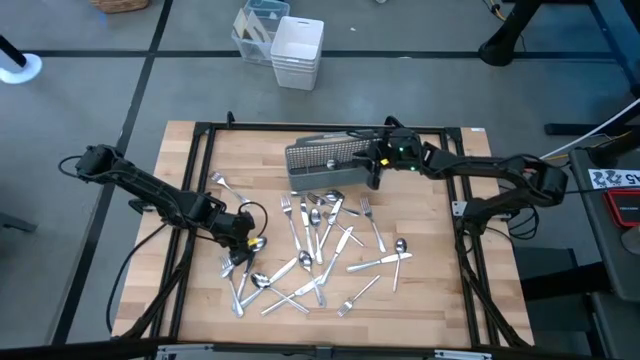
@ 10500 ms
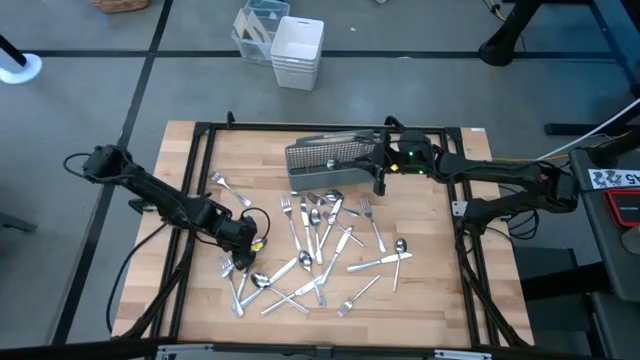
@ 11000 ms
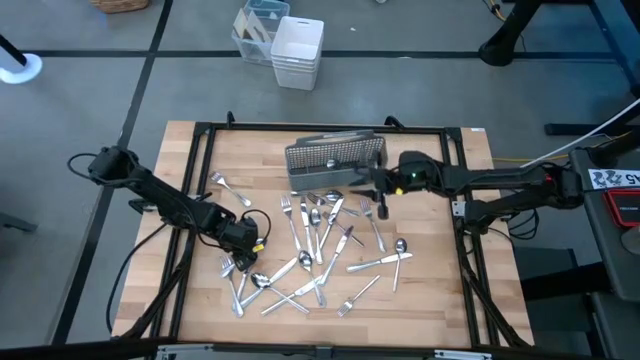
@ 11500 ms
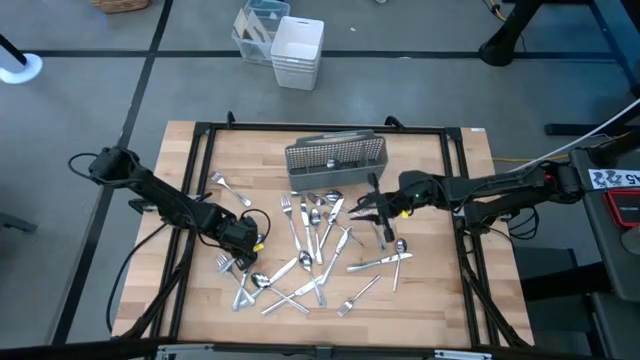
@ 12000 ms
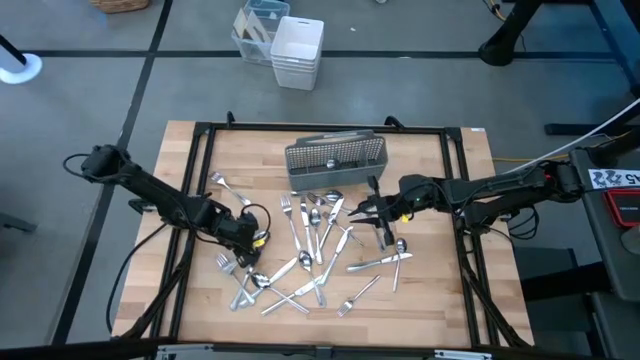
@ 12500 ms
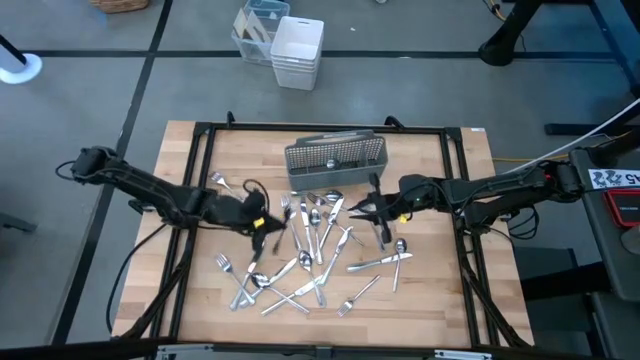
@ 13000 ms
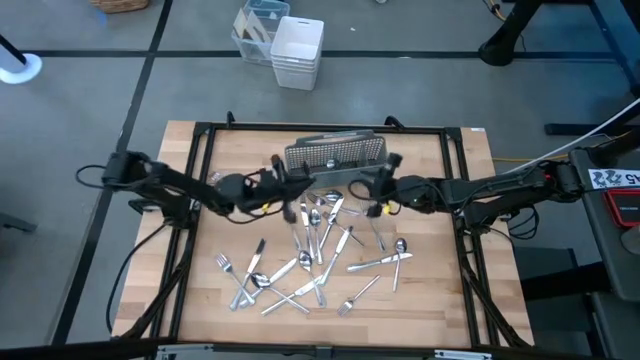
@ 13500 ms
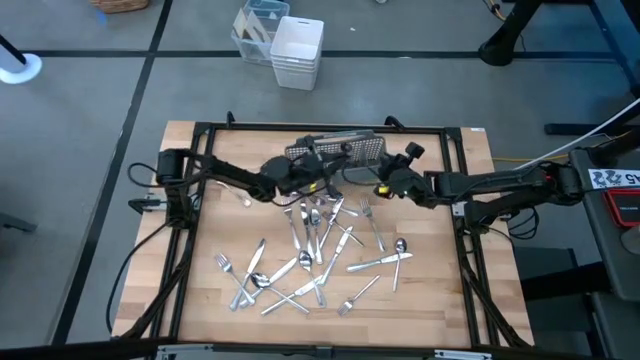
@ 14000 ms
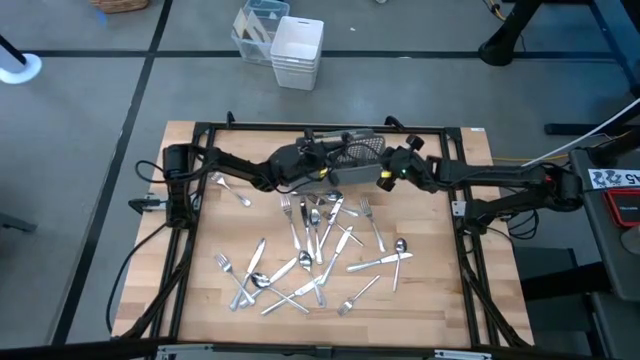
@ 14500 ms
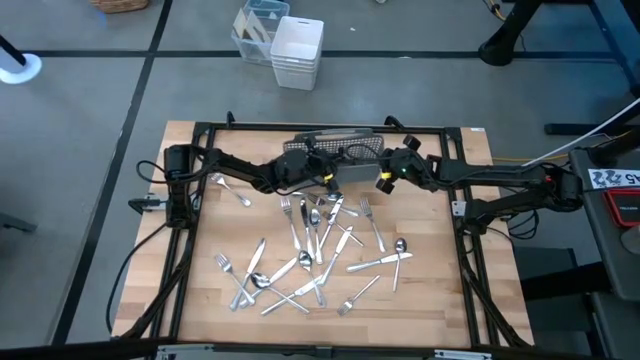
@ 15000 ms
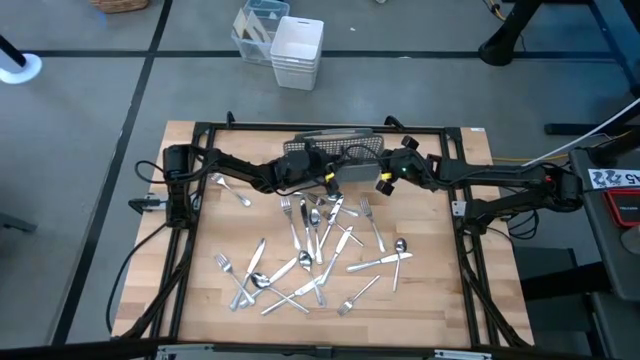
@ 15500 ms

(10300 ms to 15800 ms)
Task: Sort silverware
Put the spoon into the silverware rack

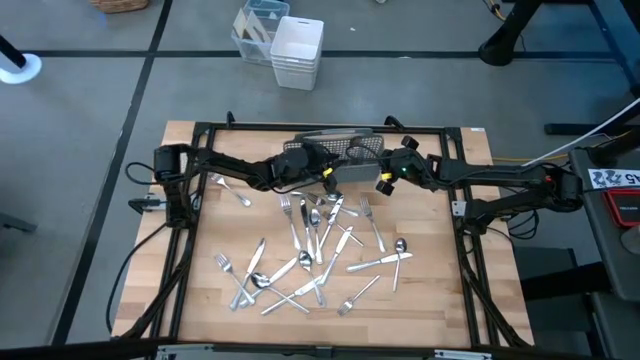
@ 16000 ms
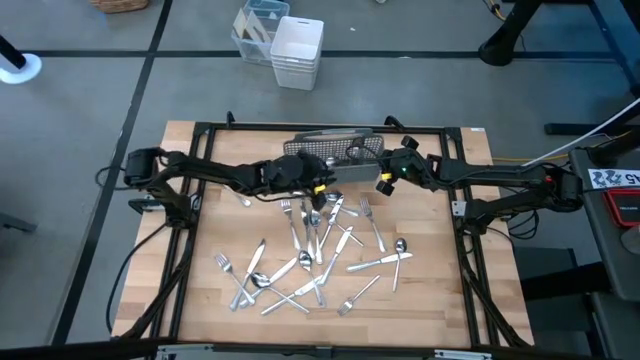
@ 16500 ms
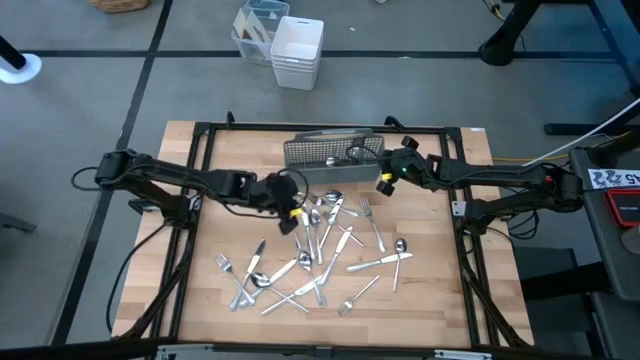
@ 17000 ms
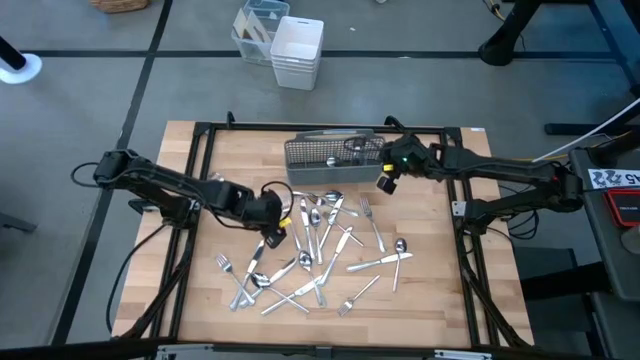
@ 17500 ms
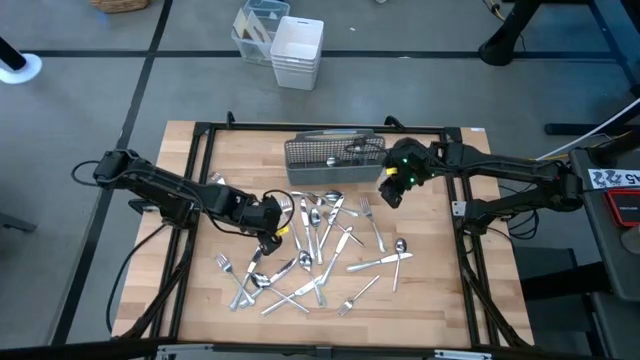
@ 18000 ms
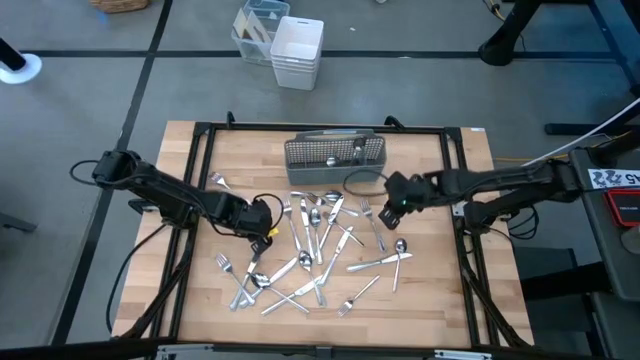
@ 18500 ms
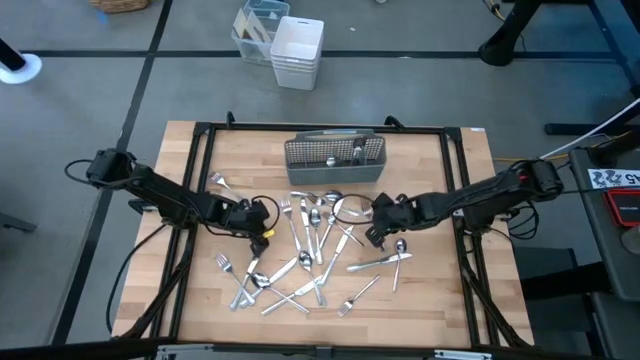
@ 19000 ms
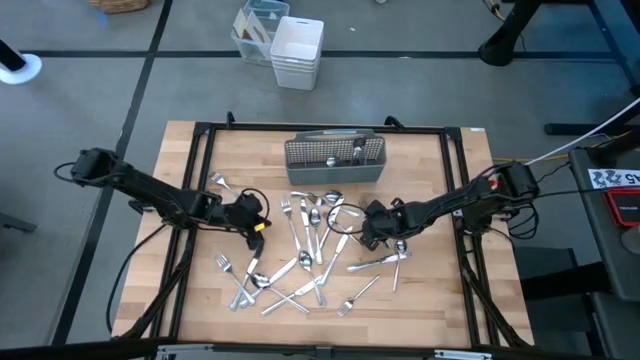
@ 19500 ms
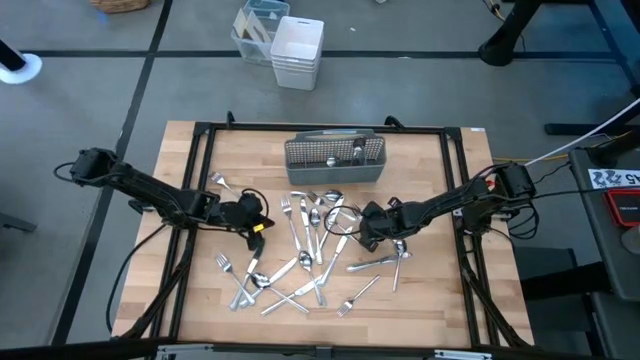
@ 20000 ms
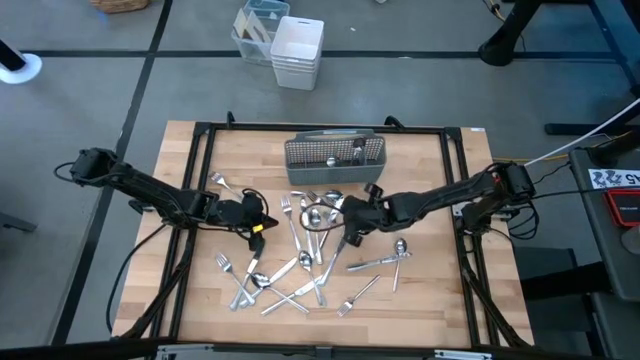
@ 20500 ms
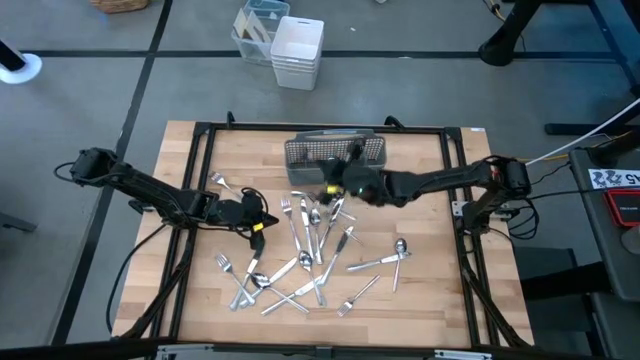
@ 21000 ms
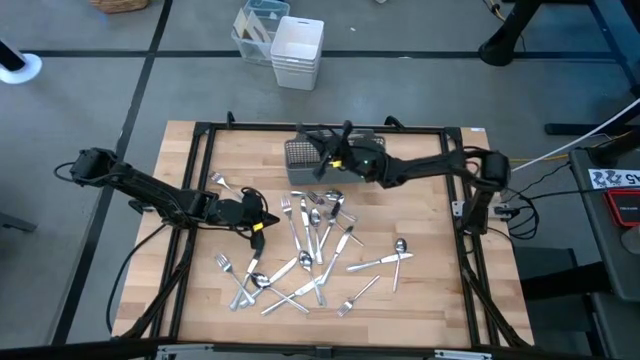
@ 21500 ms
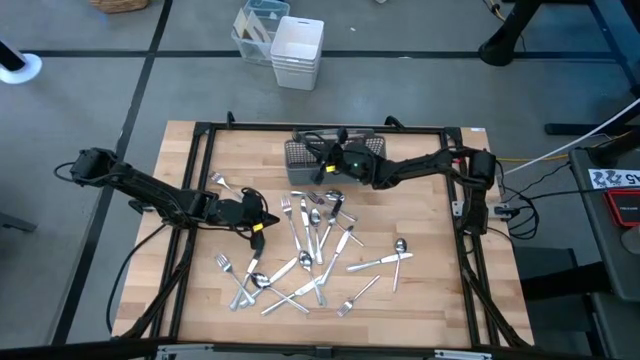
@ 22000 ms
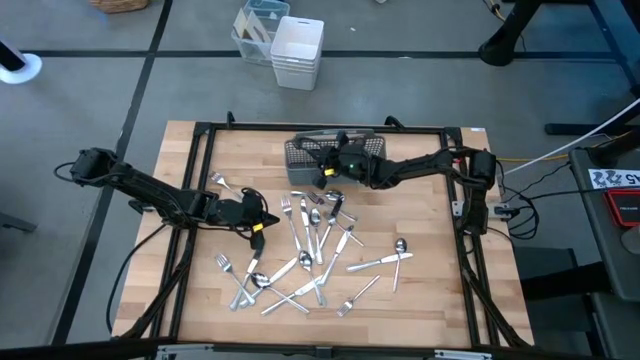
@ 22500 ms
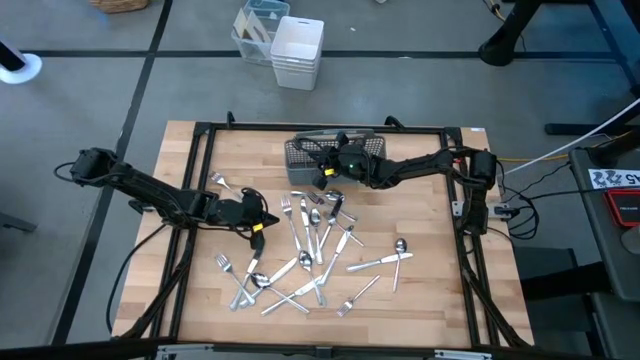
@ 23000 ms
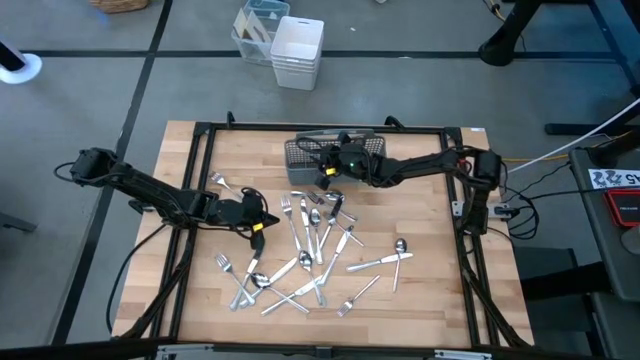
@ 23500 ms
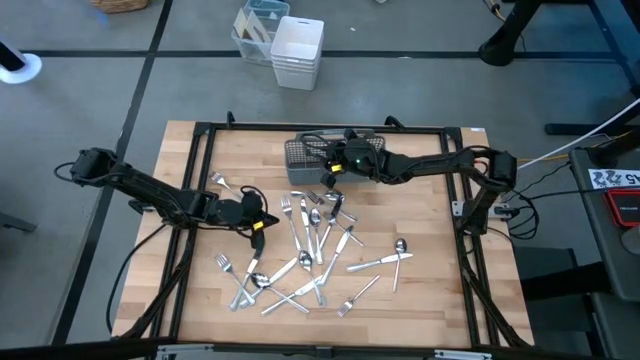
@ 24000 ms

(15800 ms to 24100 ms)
Put the fork into the silverware rack

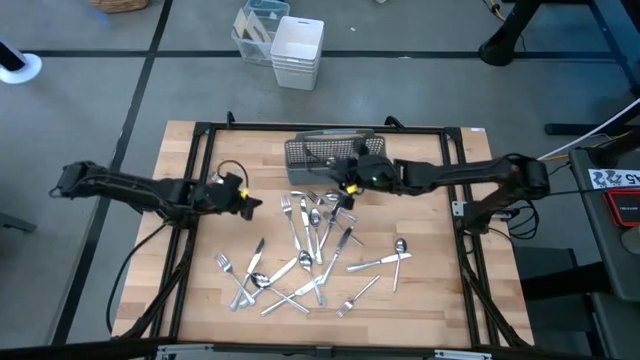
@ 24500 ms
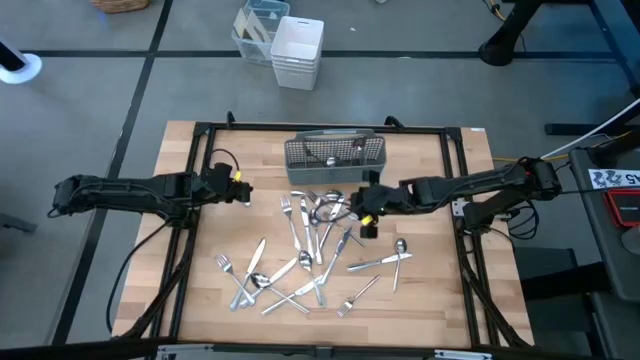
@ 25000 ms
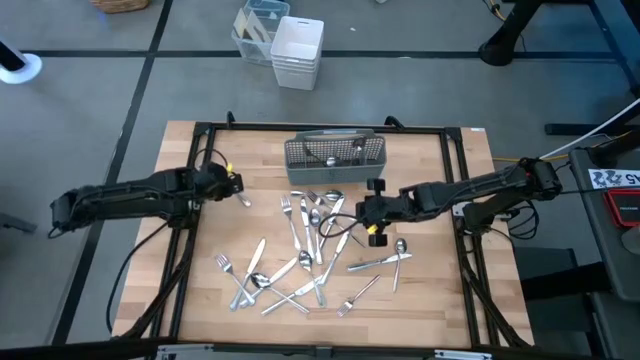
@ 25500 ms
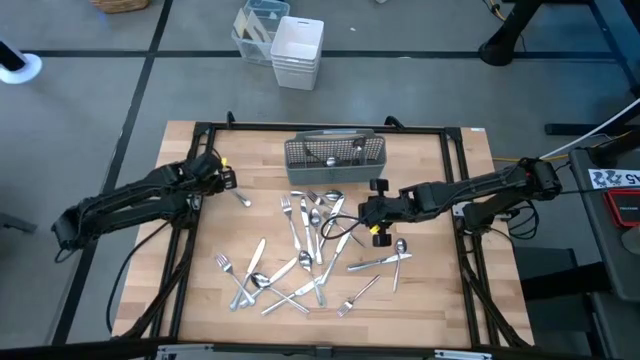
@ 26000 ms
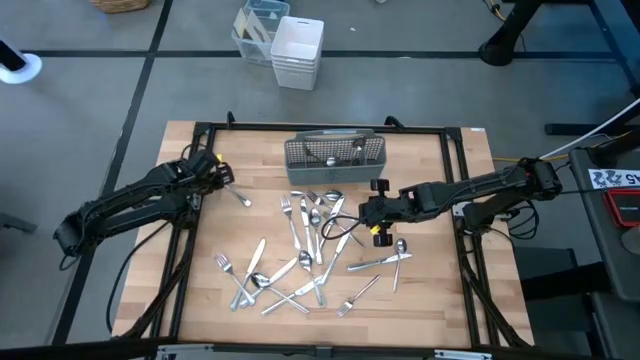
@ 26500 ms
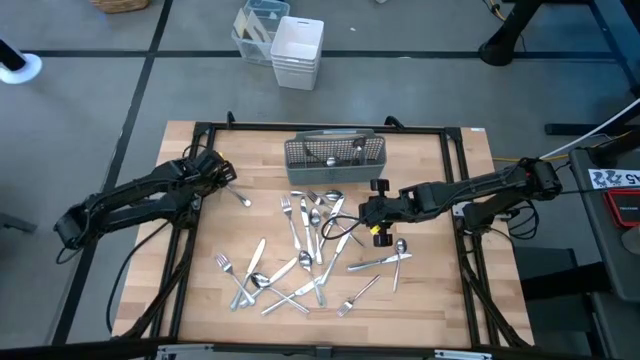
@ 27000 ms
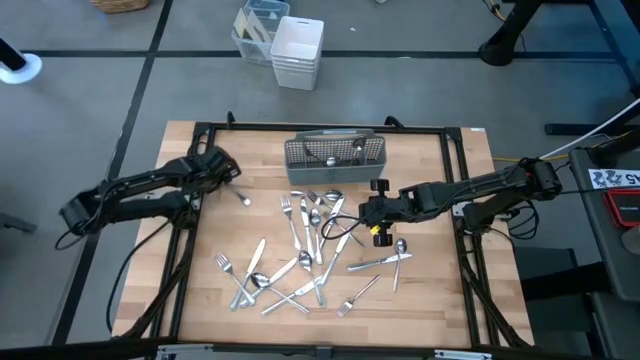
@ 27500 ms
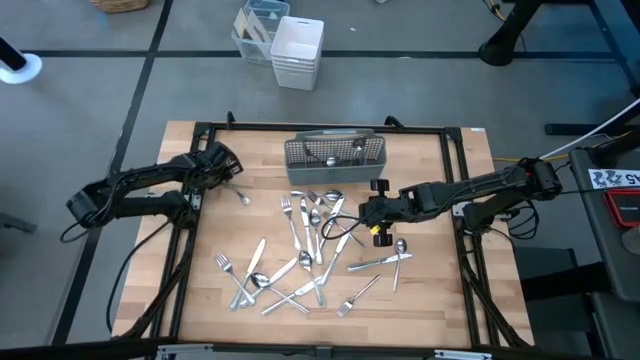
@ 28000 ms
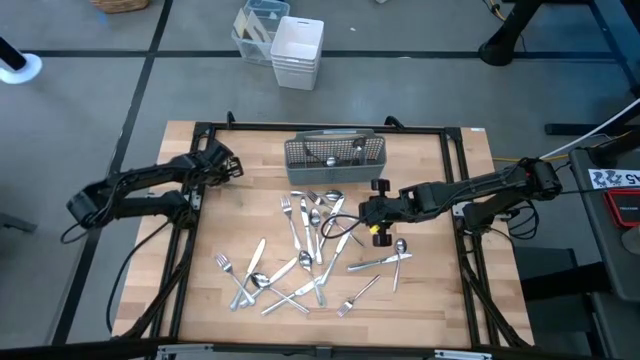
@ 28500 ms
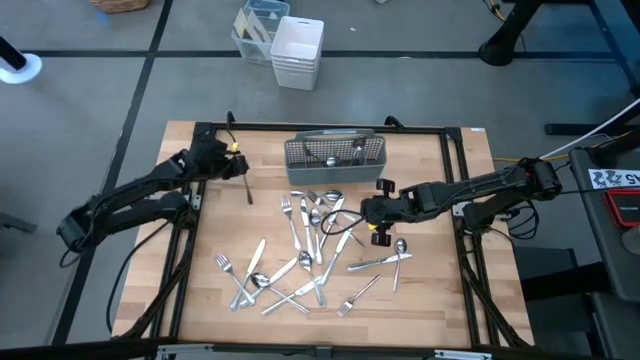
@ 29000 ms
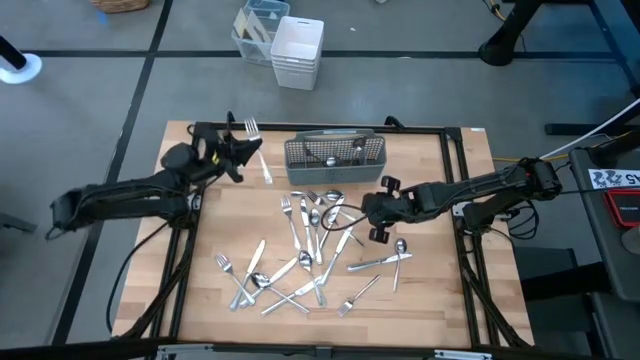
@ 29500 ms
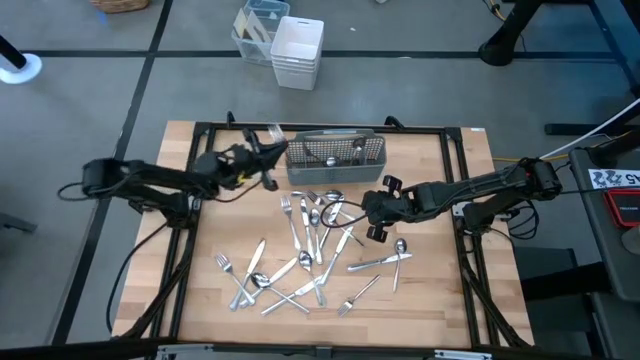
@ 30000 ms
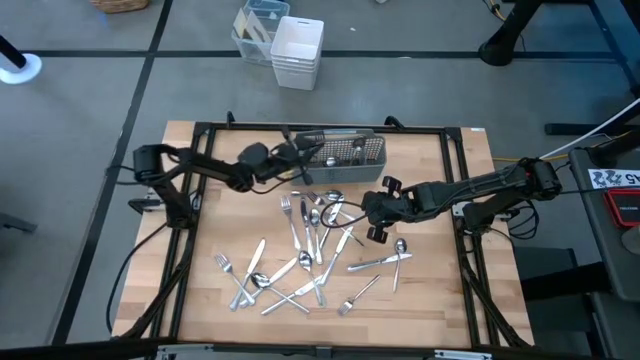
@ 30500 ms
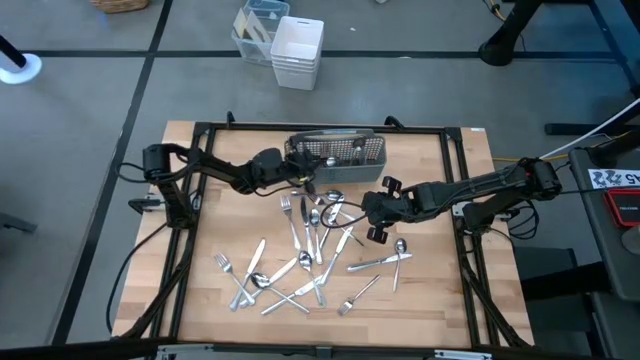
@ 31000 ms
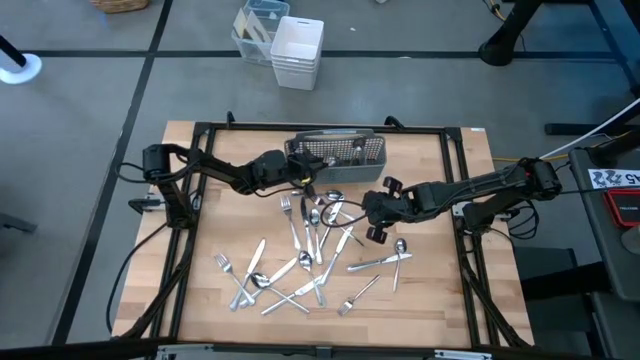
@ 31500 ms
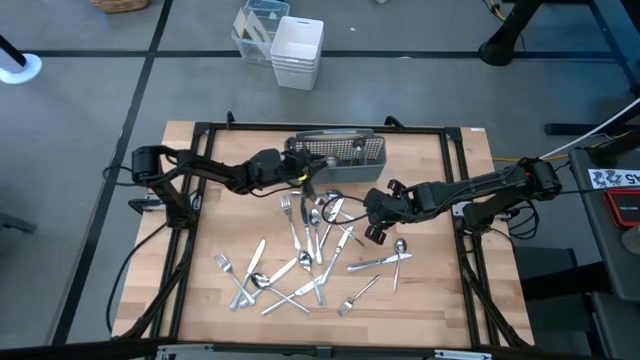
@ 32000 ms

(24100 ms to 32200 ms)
Put the fork into the silverware rack
